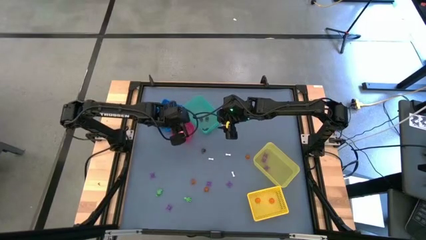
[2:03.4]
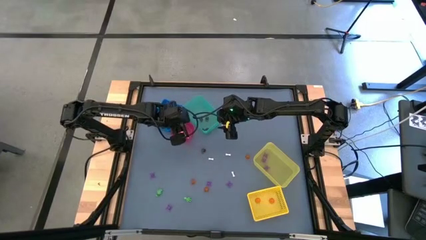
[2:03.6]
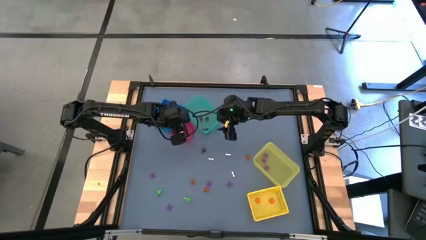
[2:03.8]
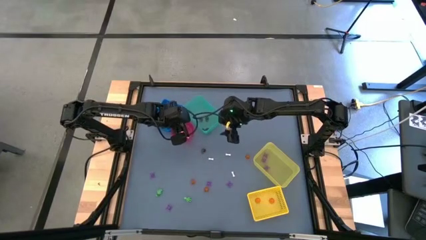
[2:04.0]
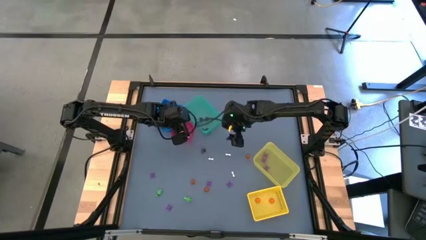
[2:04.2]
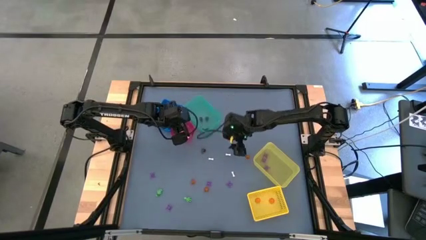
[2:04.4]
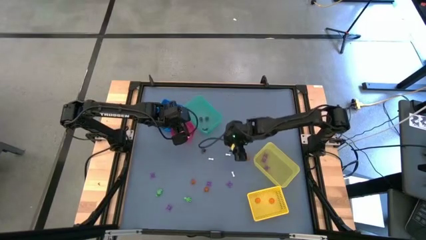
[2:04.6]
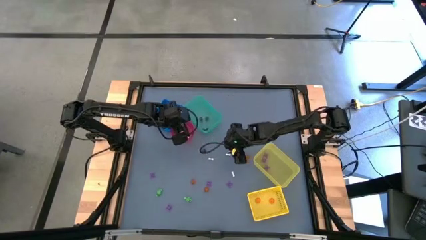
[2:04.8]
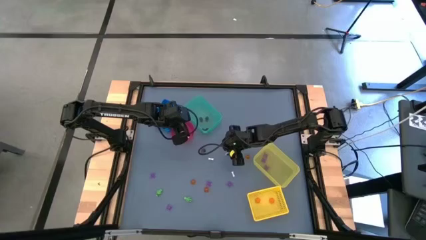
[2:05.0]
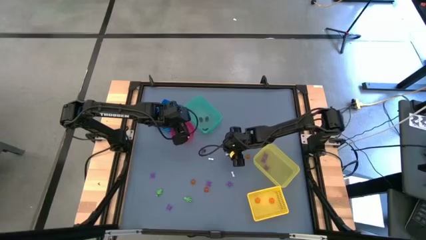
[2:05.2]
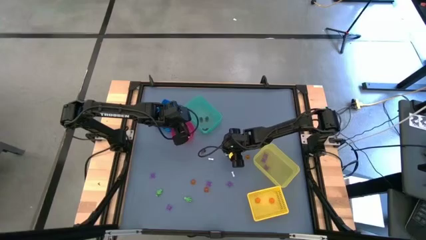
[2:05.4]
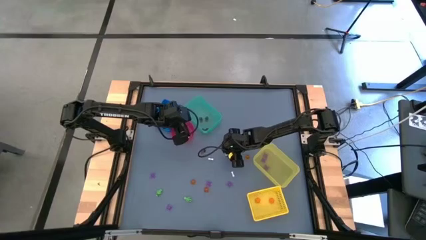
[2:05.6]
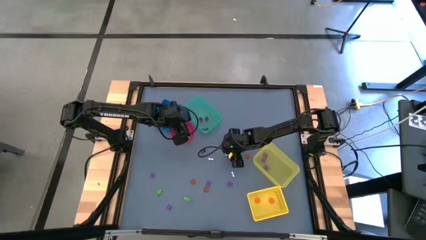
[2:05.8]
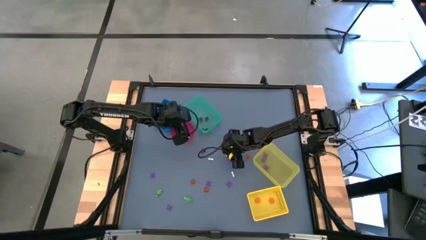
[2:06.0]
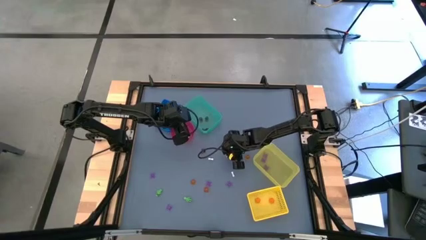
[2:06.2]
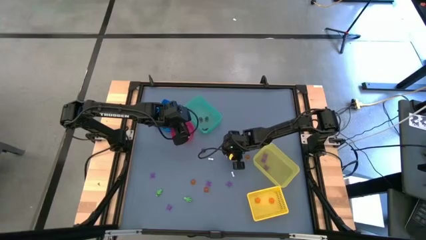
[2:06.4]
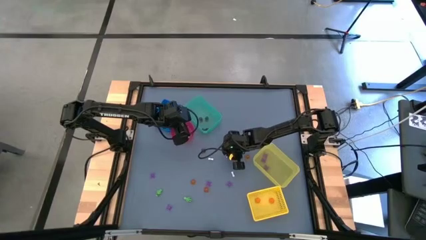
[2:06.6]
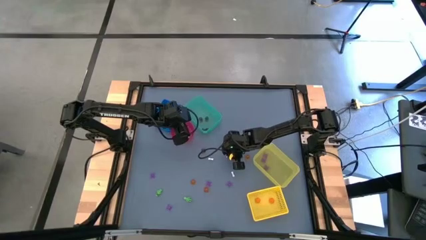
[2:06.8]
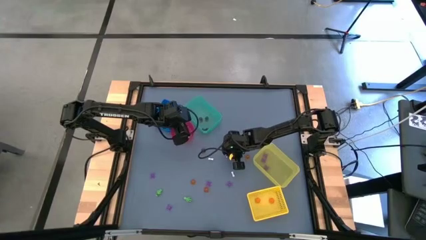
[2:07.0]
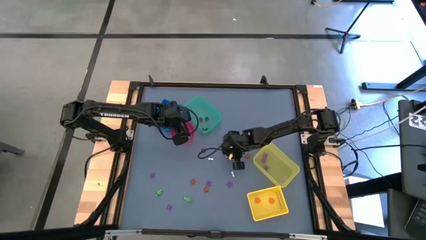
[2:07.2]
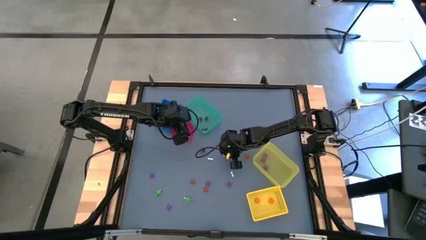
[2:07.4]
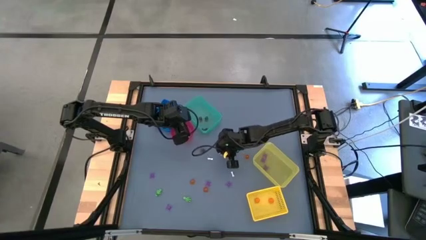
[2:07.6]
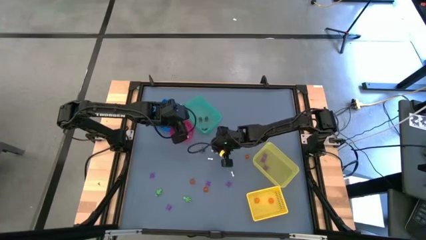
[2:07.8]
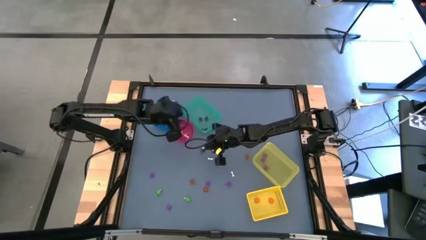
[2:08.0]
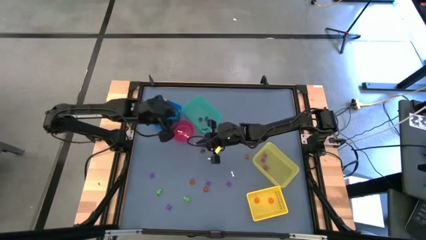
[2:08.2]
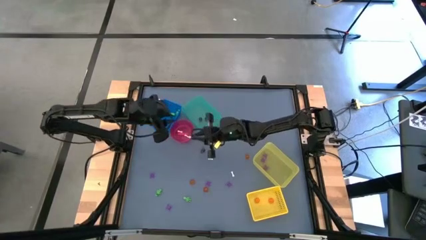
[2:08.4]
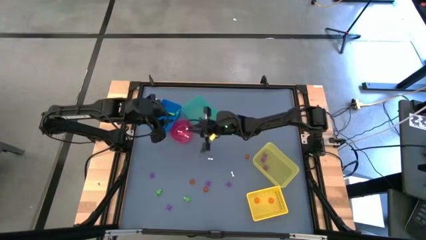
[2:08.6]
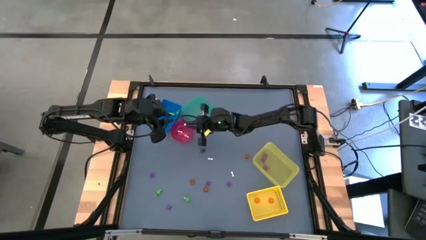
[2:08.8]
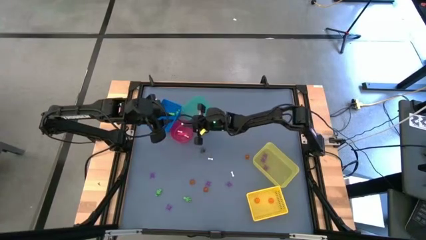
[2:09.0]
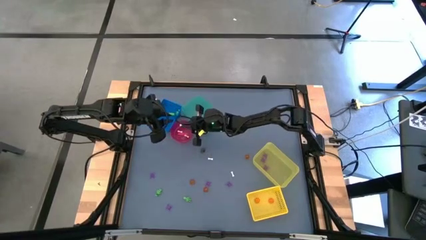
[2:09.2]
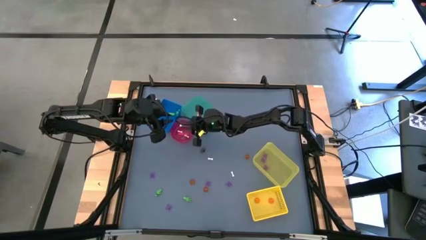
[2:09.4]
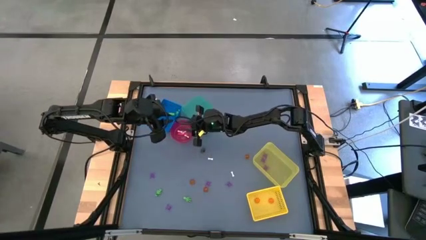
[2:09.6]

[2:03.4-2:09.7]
Task: Sort Halloween decoration
Put the white bone toy into the red bin

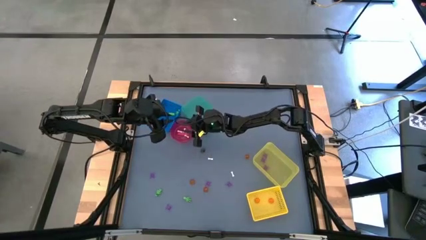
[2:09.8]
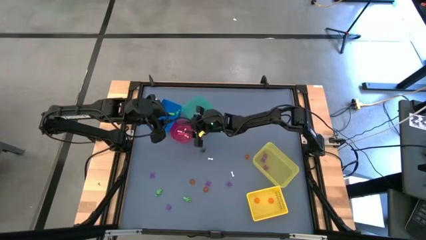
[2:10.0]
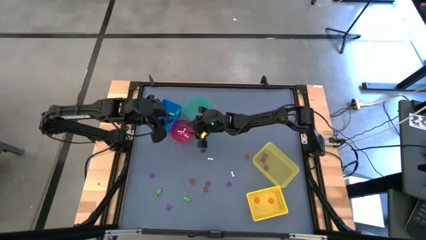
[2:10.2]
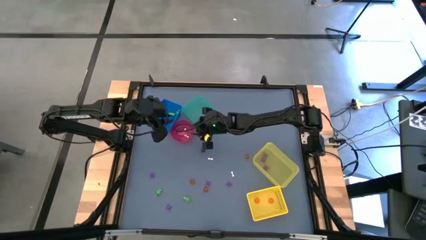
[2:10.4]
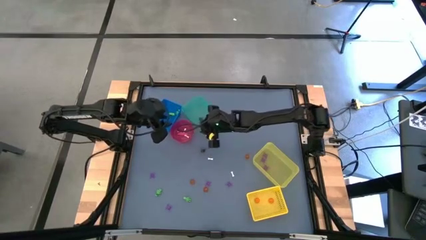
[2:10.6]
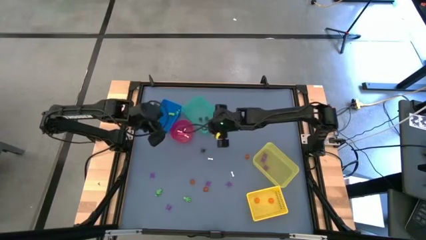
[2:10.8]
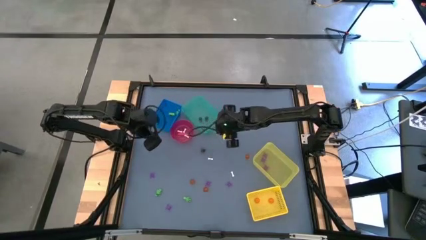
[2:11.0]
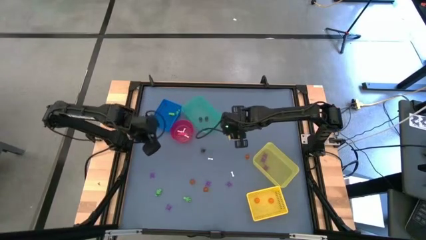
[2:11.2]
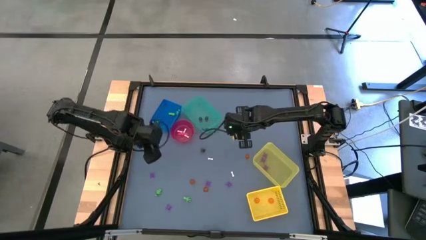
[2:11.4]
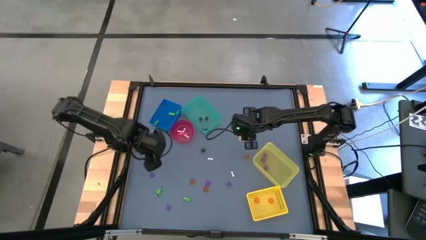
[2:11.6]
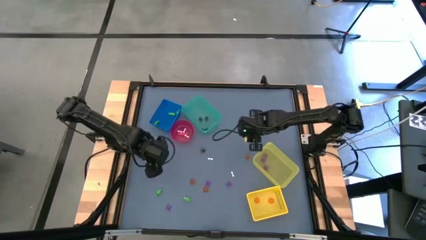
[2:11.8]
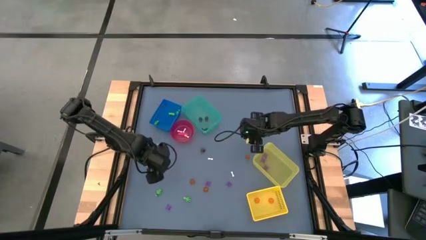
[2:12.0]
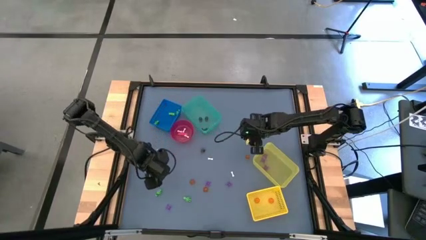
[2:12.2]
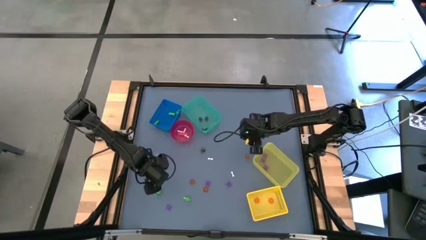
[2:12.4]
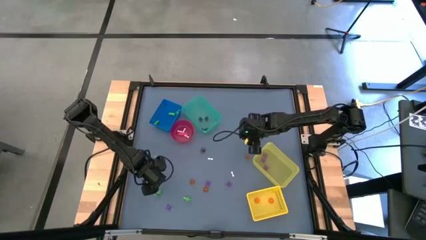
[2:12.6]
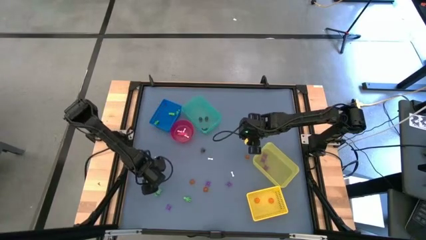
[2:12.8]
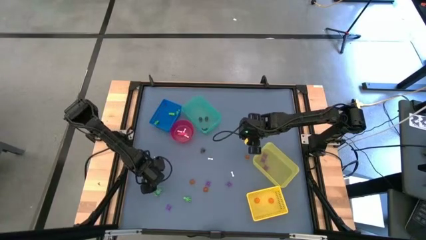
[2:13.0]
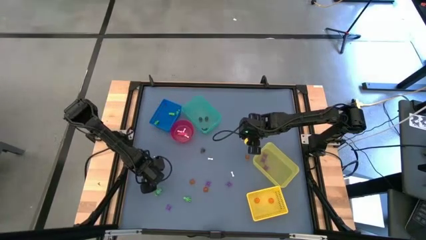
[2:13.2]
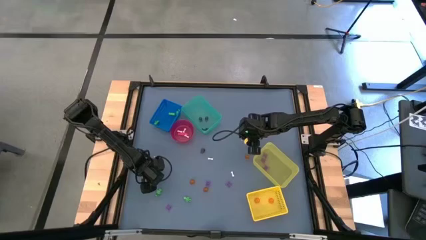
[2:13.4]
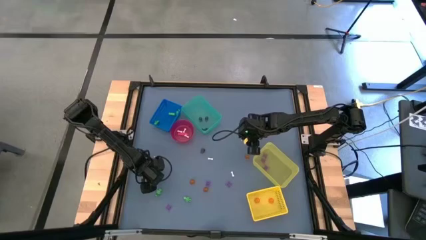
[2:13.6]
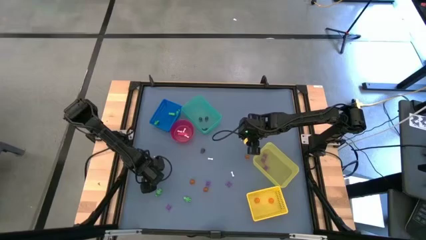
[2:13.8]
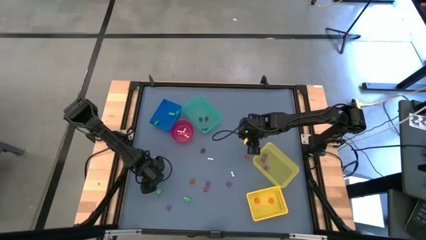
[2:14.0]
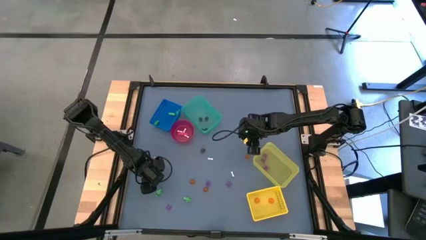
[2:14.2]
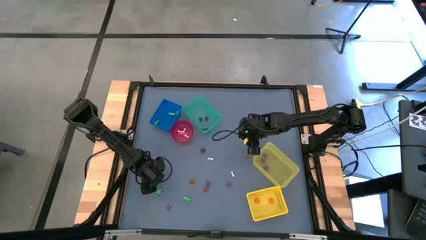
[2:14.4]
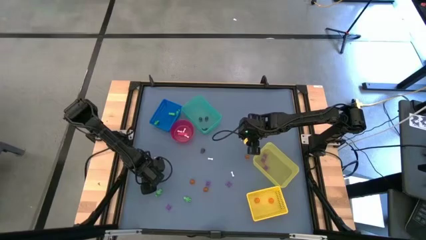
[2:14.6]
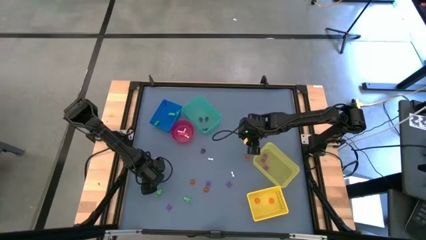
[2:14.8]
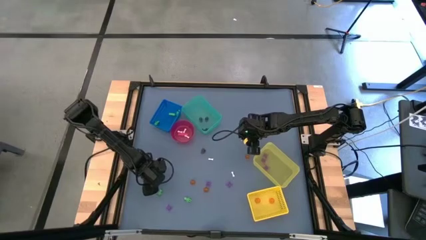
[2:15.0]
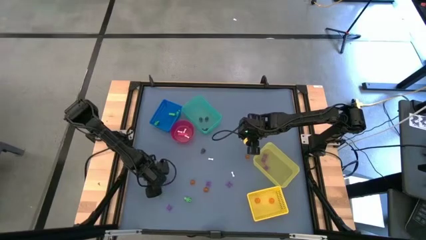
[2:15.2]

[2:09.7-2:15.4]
Put the purple spider toy into the yellow bin

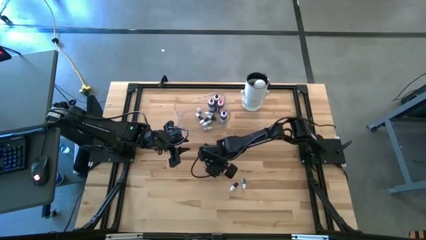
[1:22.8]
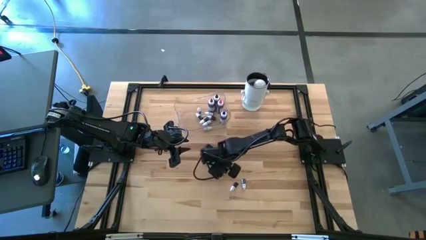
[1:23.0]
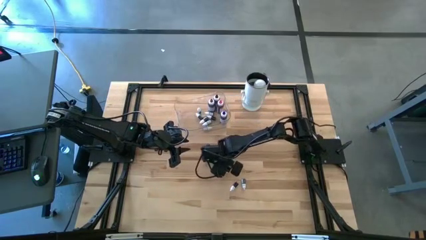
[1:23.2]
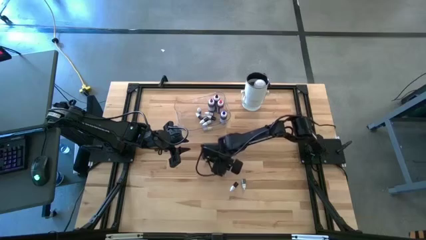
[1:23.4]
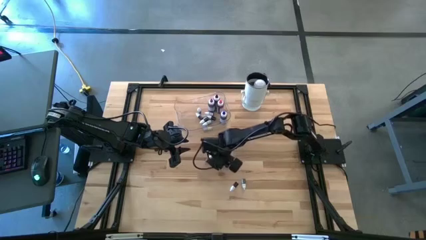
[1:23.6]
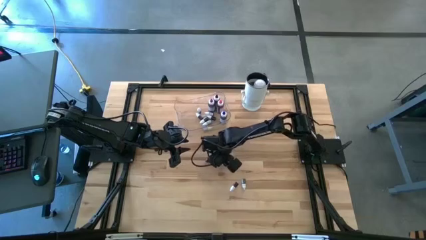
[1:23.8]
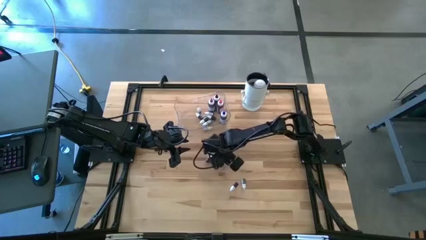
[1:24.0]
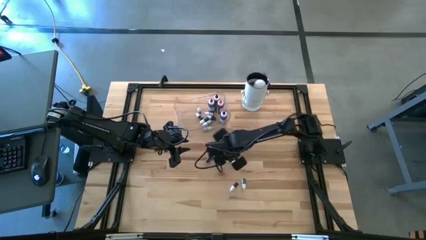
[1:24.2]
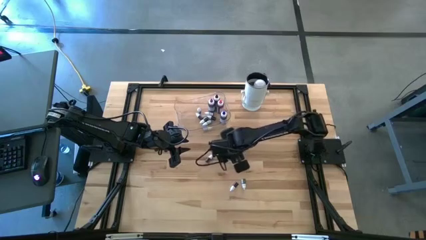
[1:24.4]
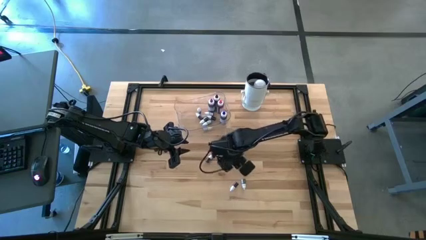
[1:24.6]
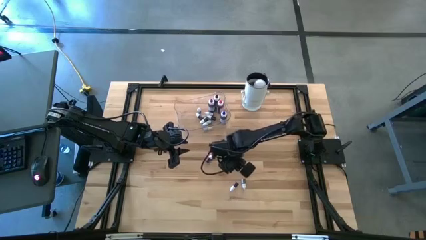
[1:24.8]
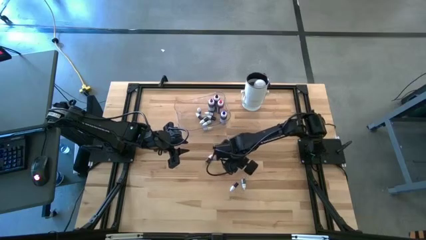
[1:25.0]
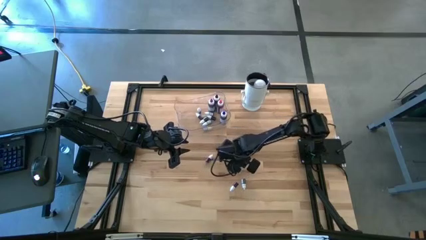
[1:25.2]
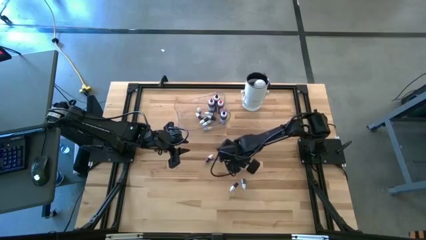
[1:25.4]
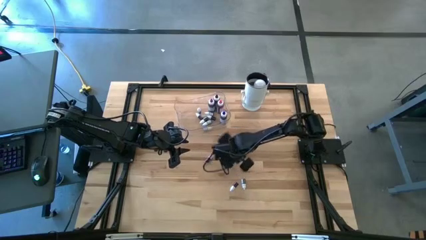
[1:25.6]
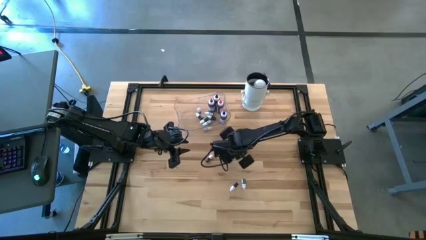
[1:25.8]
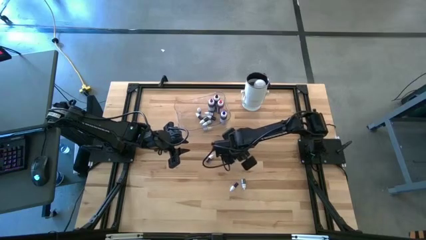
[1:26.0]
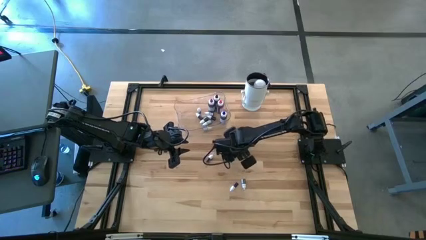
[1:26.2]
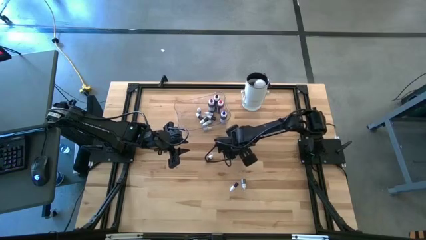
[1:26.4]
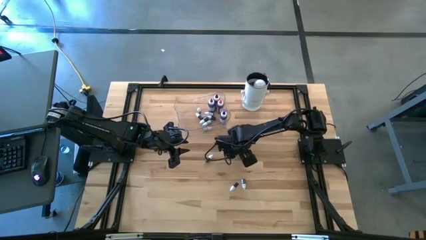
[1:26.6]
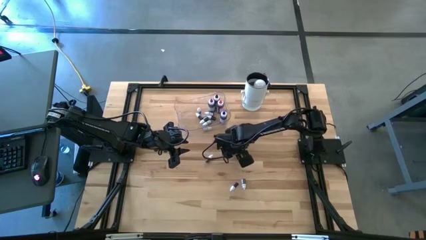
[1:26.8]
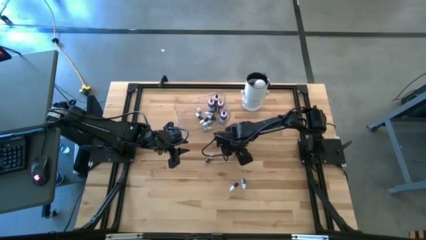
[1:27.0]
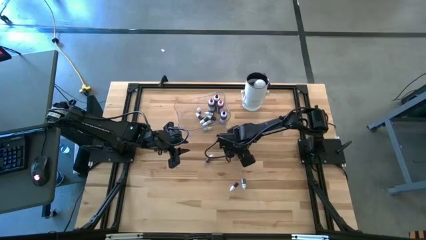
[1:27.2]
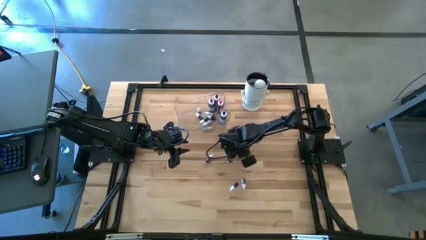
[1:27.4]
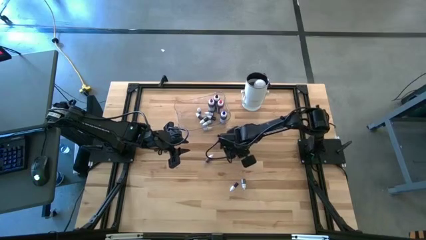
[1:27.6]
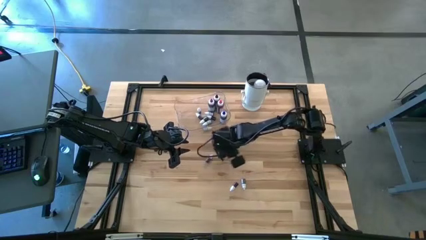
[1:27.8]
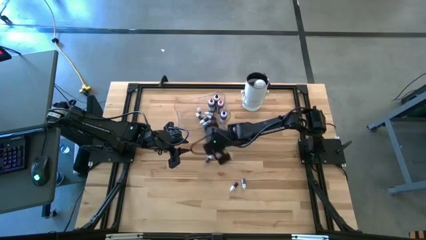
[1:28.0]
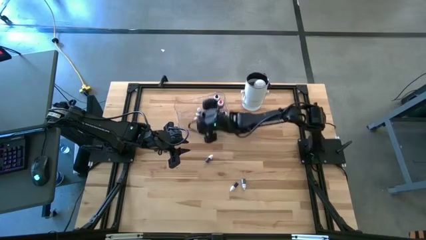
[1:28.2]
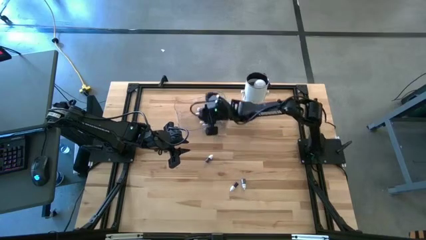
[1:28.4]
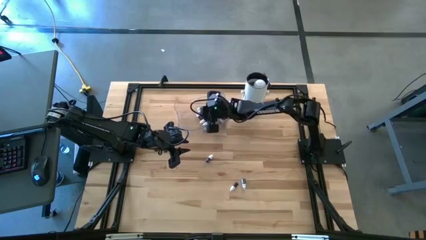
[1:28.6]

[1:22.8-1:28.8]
Task: Pick & Place food coloring
Put the small red food coloring bottle into the transparent container
